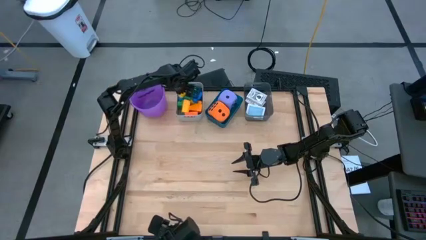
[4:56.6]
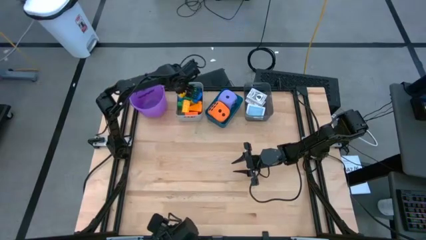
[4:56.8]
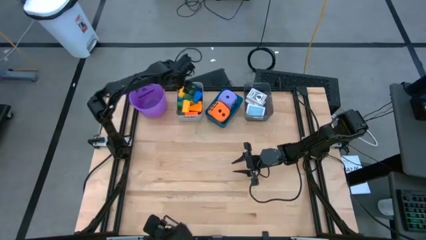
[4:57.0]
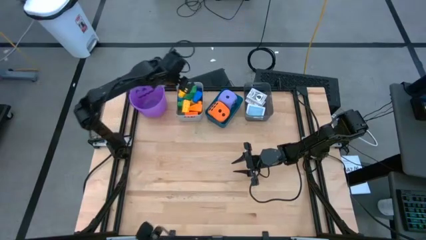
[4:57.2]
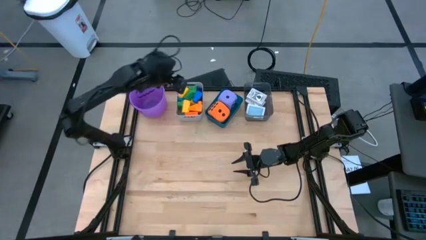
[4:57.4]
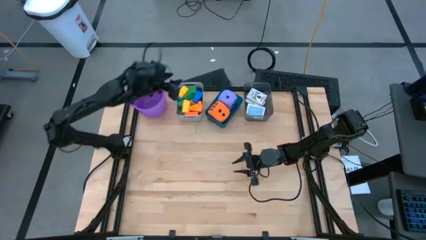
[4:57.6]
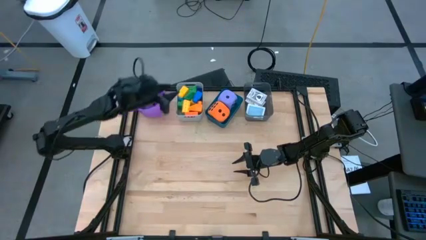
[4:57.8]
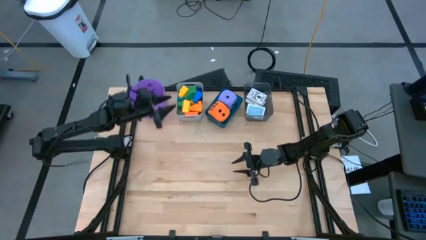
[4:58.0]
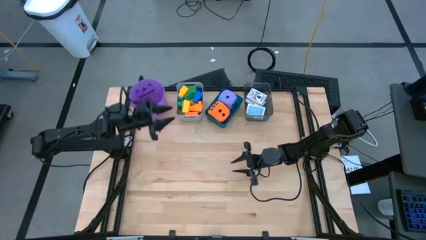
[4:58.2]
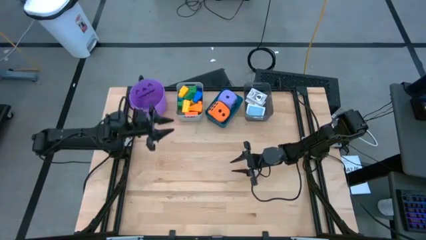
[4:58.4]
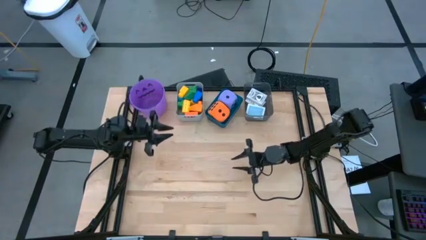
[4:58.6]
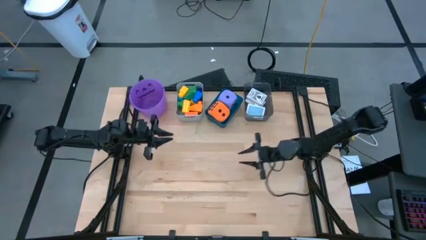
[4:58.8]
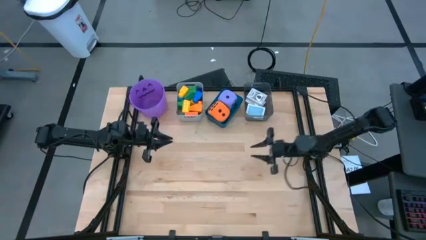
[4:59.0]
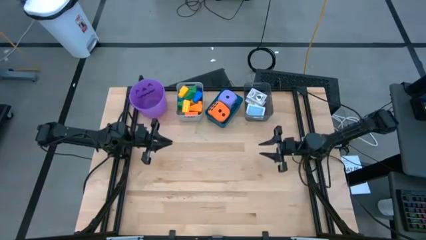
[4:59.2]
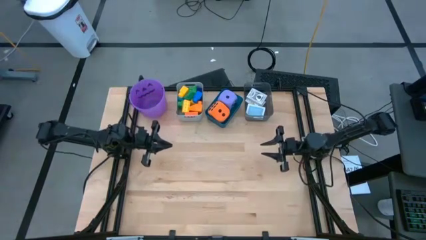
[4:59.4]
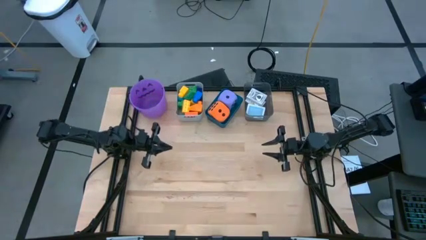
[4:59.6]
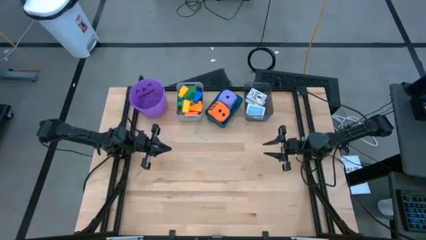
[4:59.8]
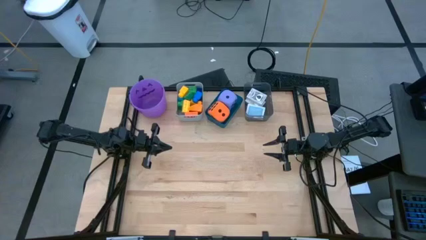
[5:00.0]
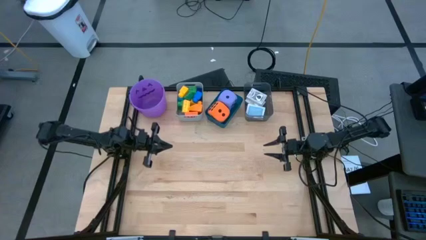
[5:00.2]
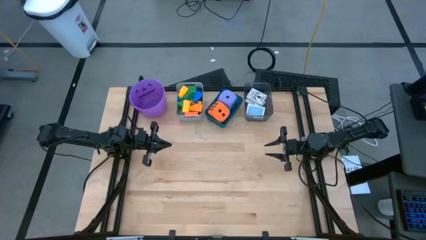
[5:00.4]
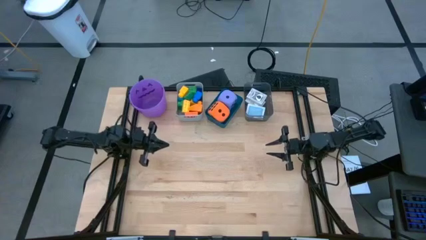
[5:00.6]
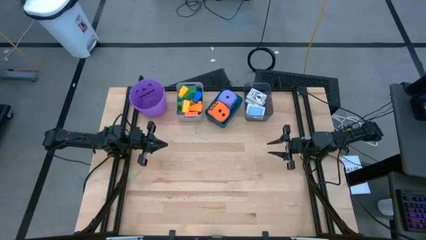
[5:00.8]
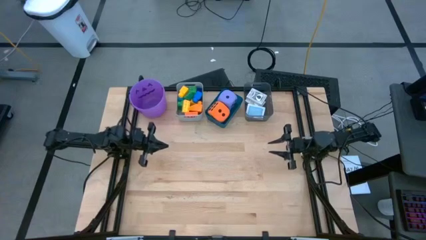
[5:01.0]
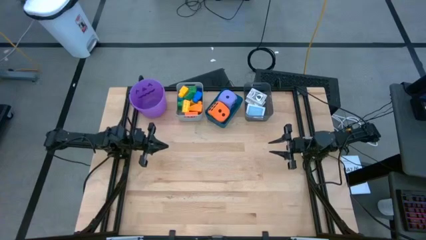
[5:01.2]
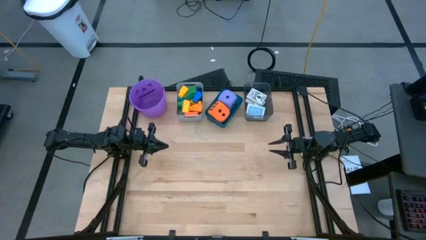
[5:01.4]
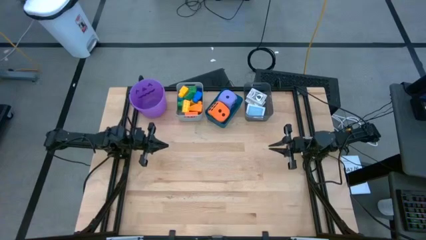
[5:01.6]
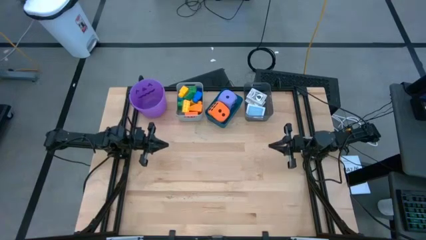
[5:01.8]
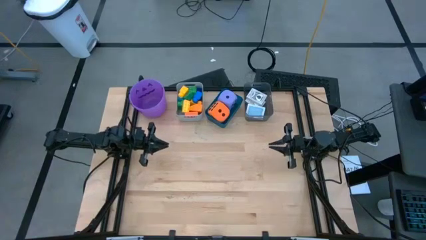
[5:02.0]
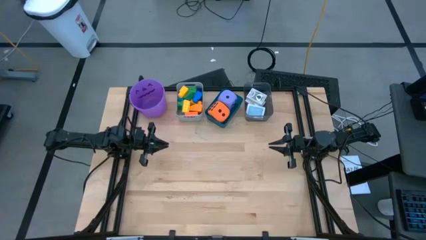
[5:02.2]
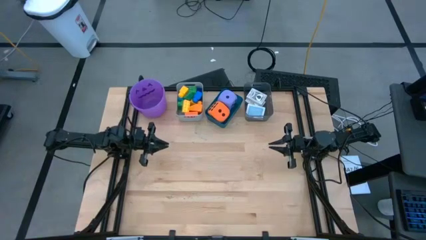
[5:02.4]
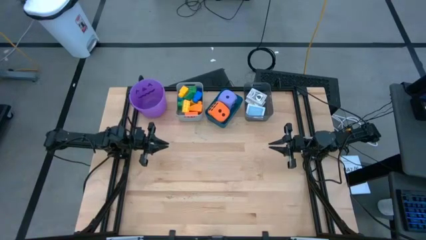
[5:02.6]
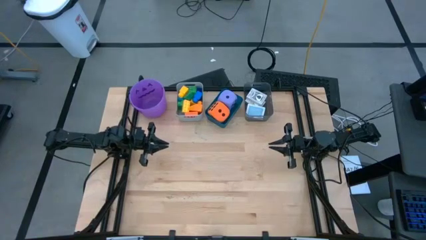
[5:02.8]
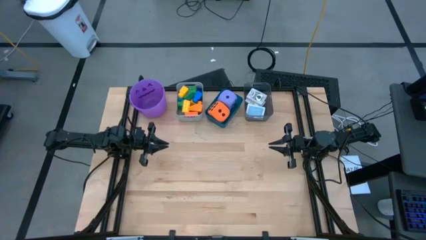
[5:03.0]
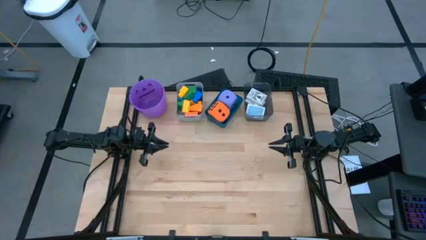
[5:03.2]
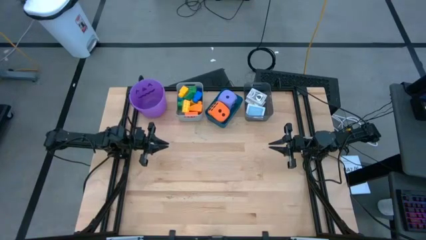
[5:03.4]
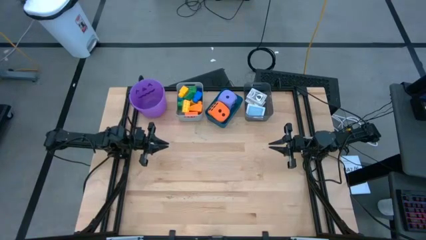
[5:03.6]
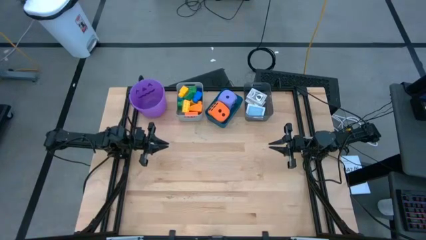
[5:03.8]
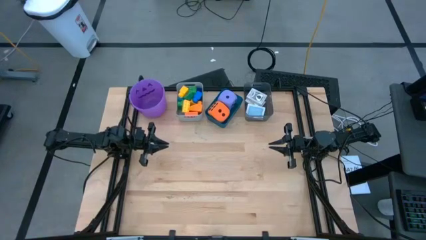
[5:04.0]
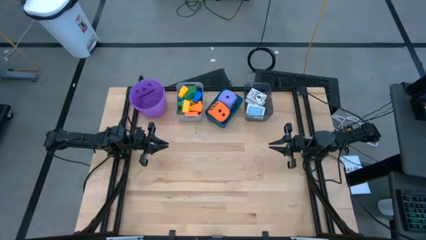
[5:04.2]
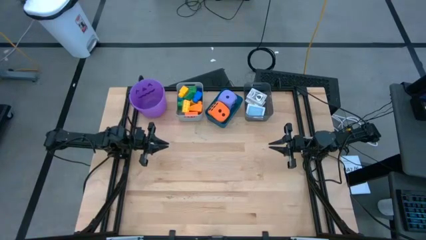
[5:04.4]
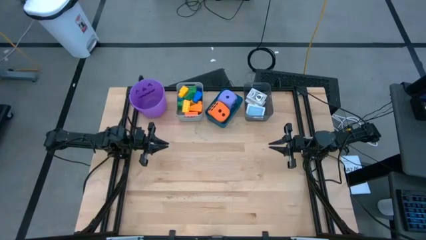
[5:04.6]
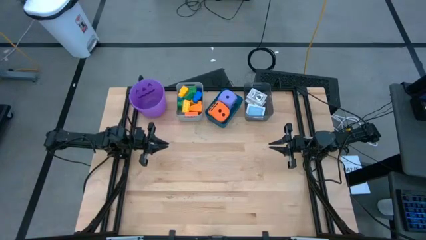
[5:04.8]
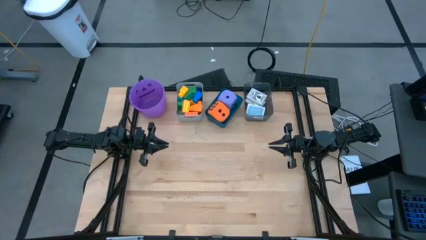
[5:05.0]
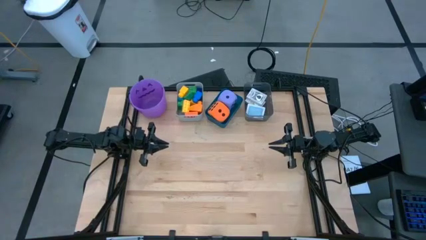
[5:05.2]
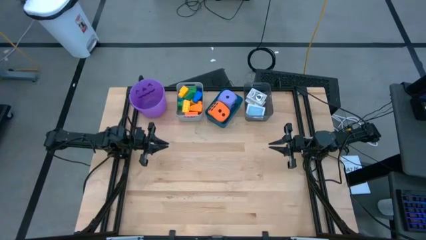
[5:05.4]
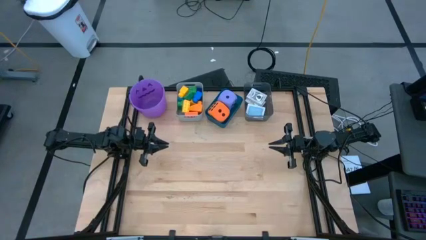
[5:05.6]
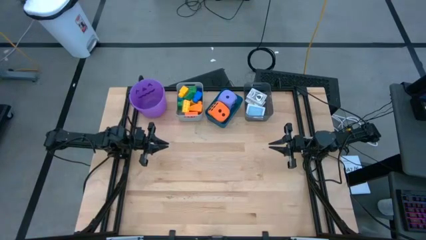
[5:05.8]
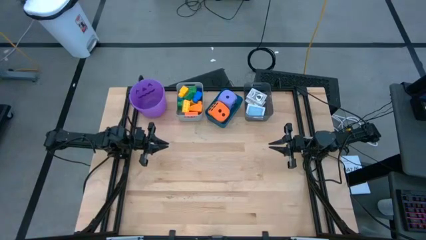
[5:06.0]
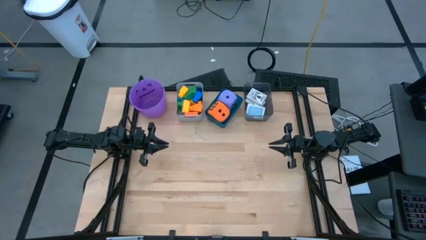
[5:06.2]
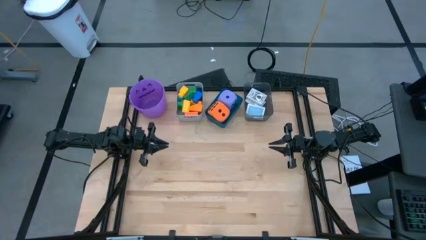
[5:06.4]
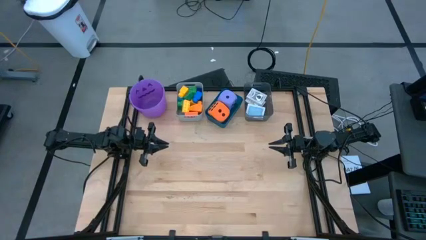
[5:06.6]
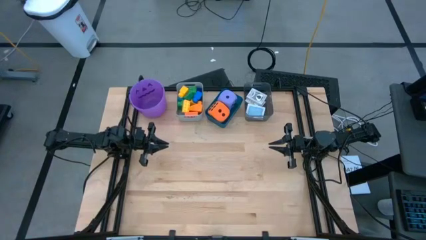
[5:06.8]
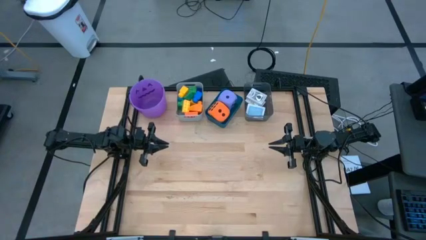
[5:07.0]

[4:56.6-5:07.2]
Task: Pick & Place Toys
Return to Home Position

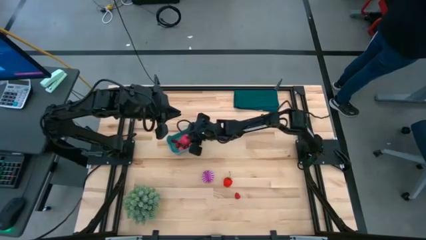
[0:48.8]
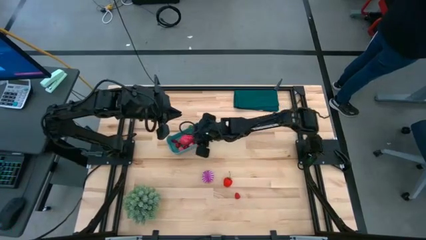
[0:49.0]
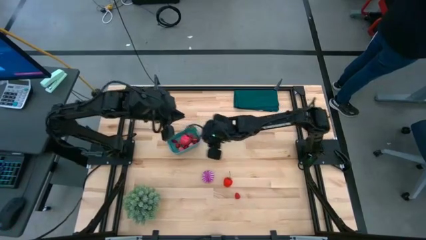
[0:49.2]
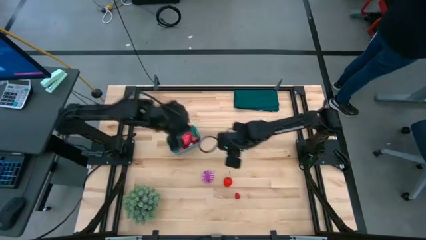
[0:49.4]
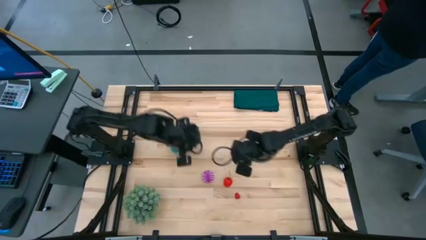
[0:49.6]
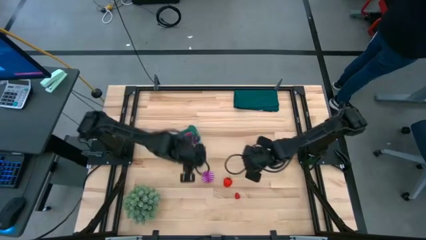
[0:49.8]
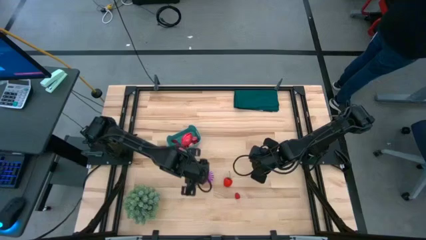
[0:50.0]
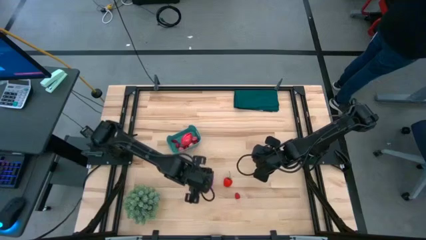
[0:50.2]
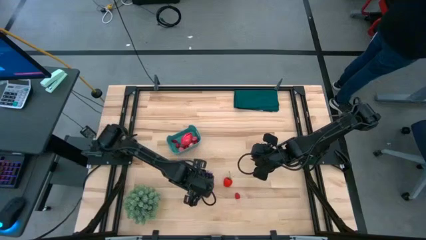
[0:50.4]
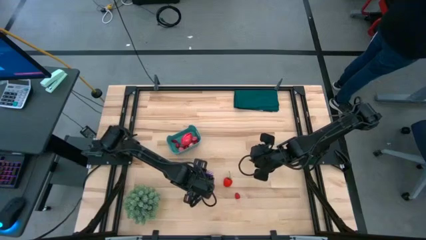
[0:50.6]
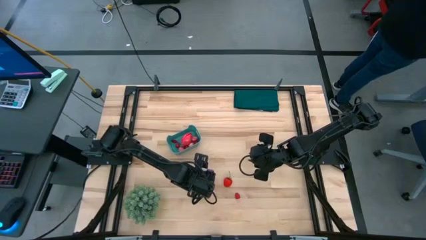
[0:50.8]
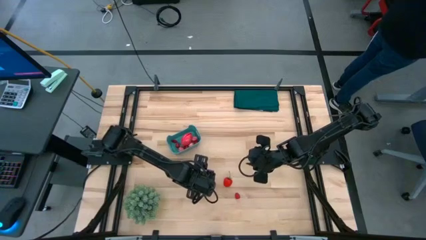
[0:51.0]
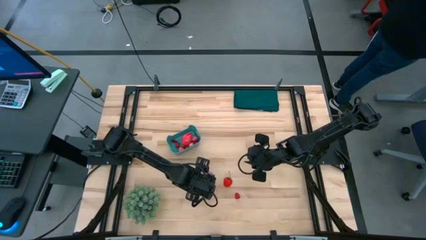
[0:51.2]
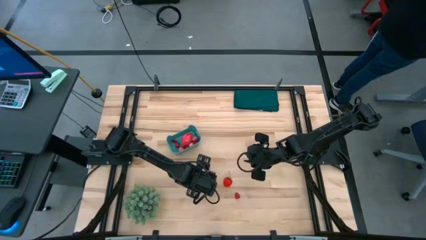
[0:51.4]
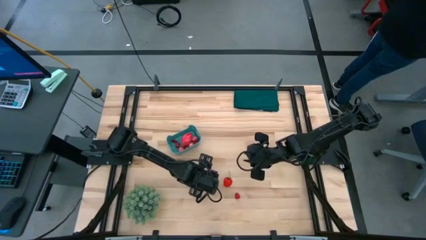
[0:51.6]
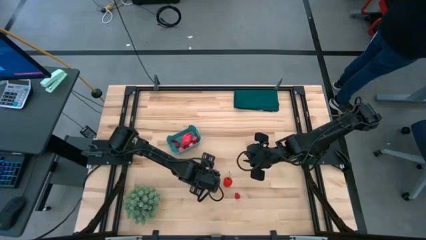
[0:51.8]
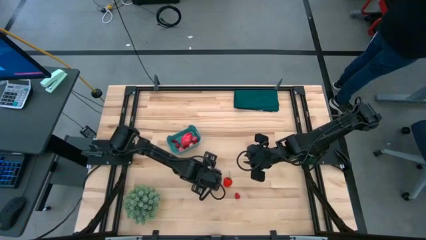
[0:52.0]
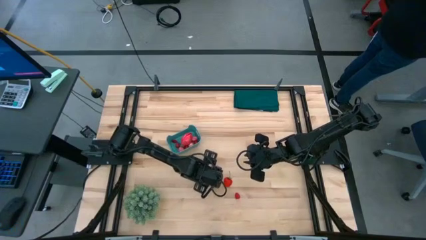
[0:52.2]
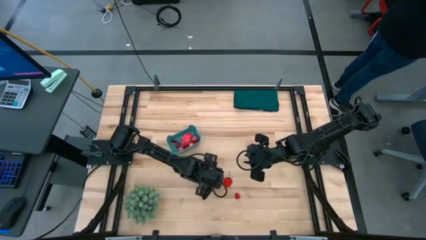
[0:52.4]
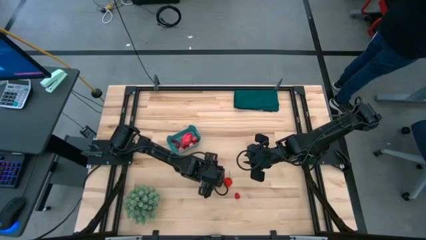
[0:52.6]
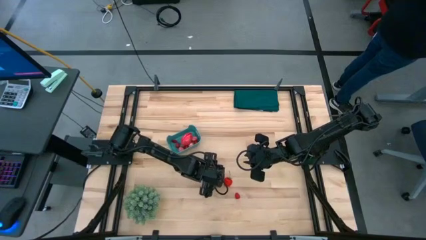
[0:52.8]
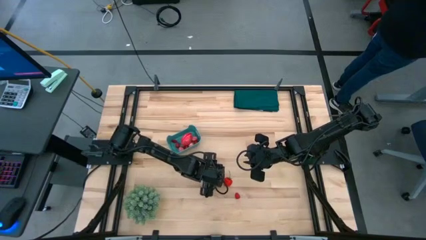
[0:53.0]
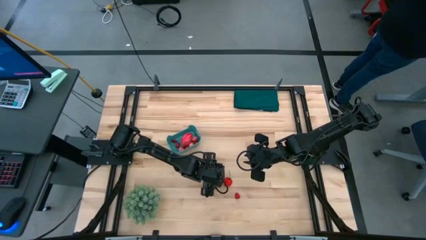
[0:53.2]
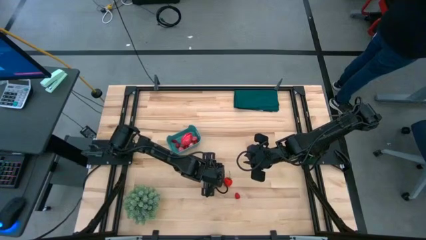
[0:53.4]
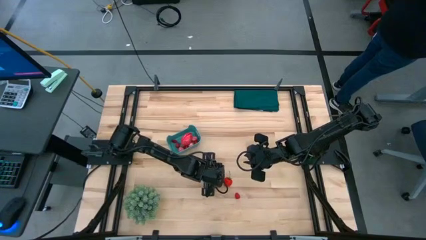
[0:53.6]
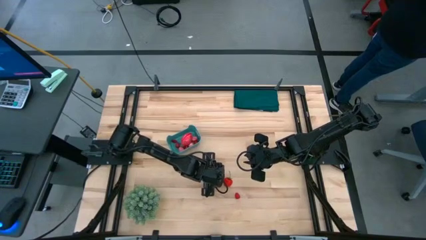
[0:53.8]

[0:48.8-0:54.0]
Task: Pick and placing Produce into tupperware
Put the violet onion into the blue bin
